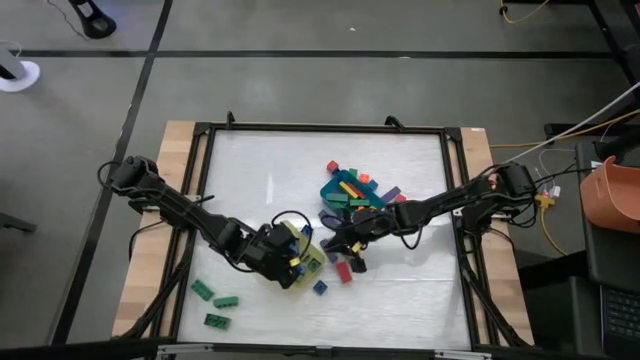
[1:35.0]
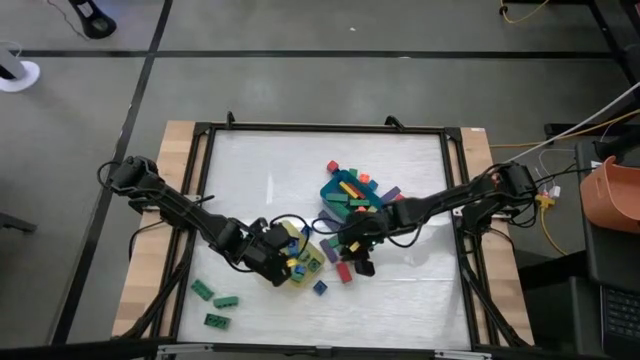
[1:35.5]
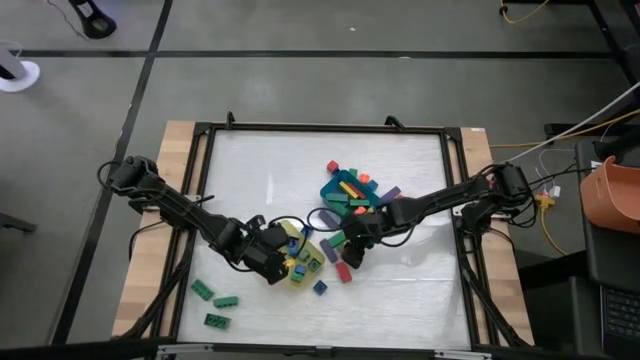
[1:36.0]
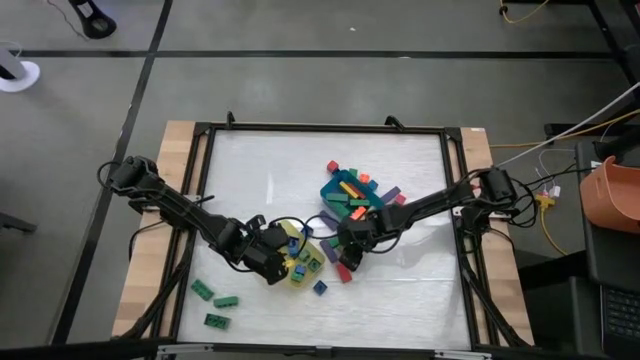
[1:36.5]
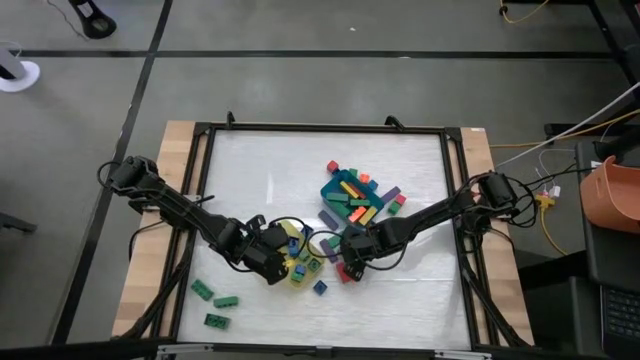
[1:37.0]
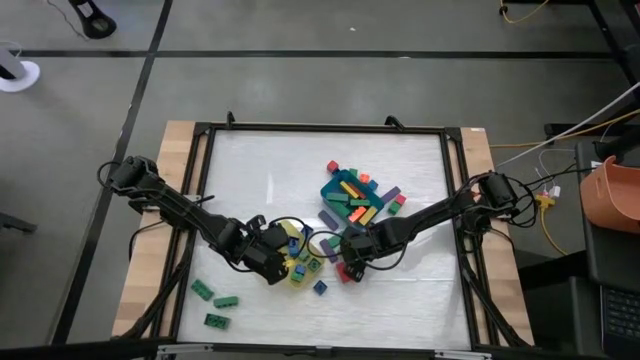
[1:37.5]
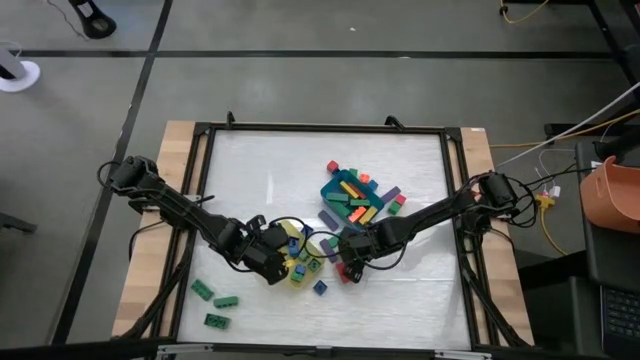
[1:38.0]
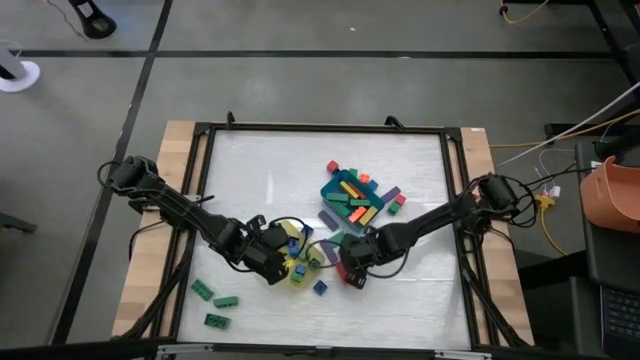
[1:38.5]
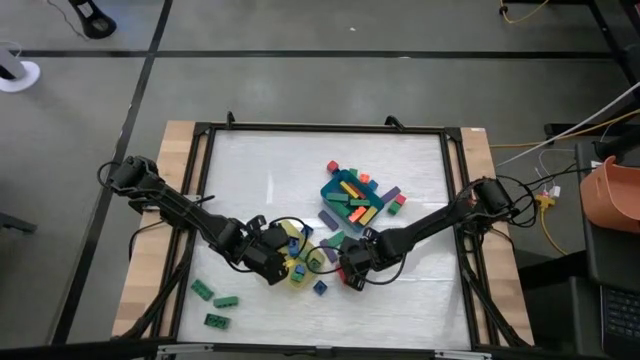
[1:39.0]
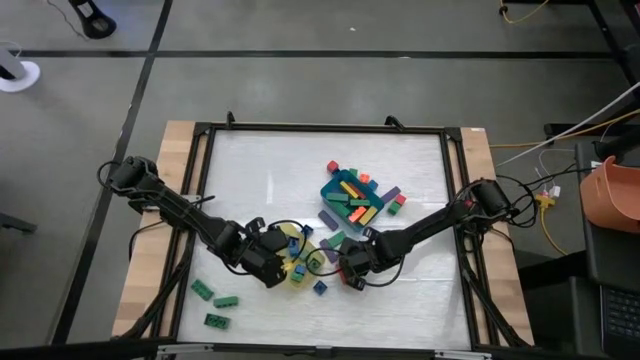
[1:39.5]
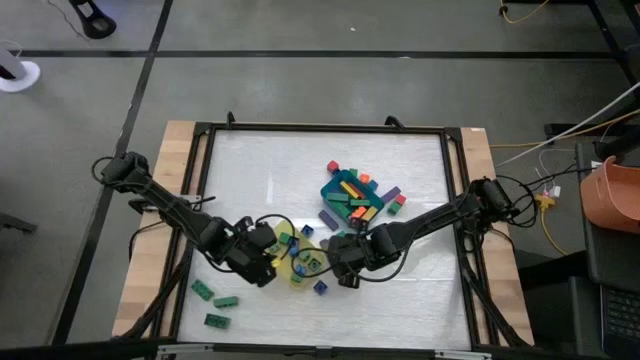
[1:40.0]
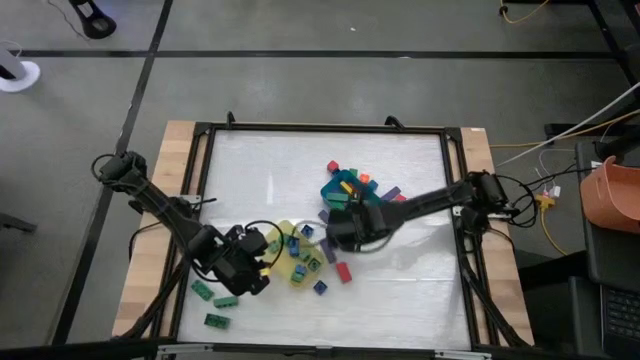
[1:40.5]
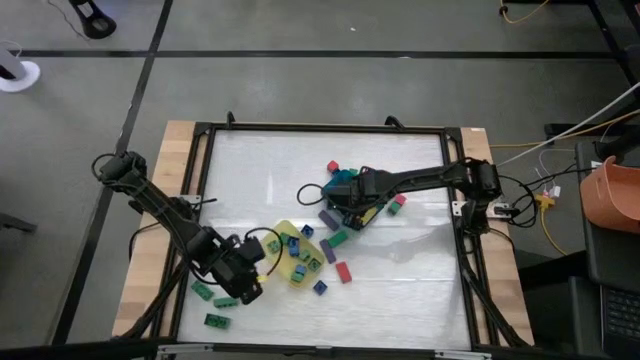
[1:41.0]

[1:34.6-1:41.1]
Task: Sort blocks by size
Put the large green wooden block into the blue bin

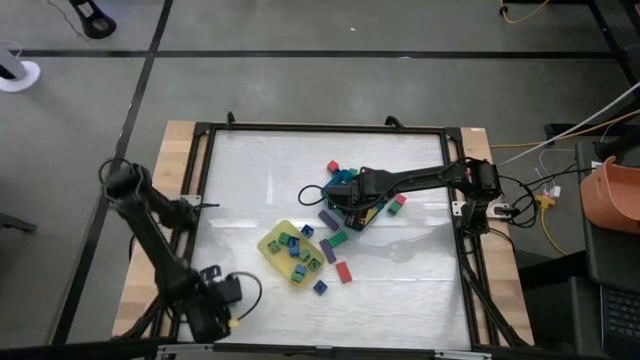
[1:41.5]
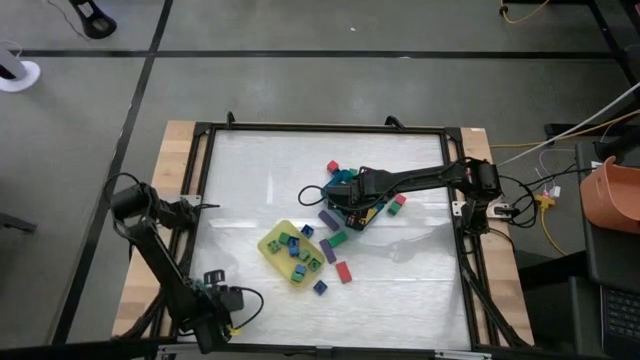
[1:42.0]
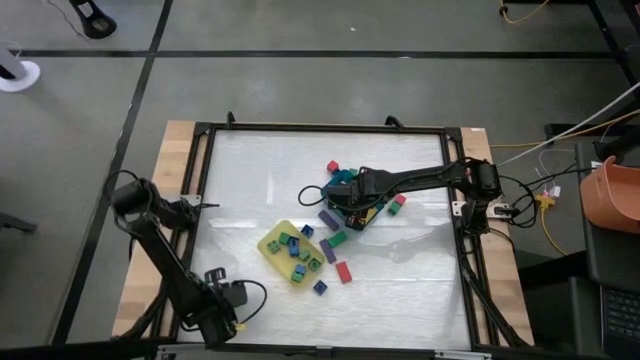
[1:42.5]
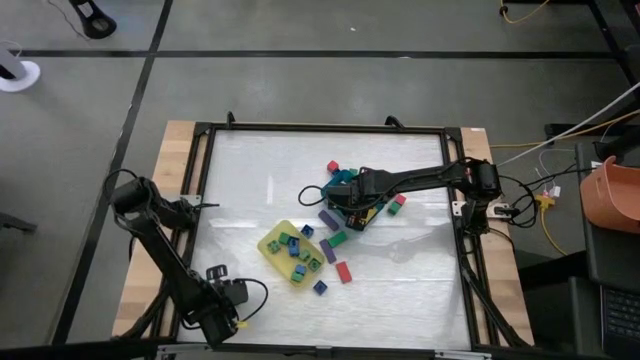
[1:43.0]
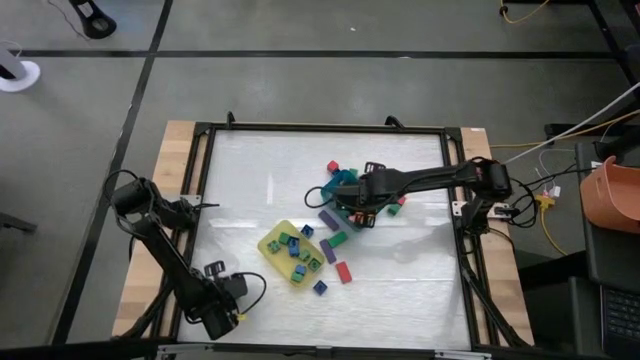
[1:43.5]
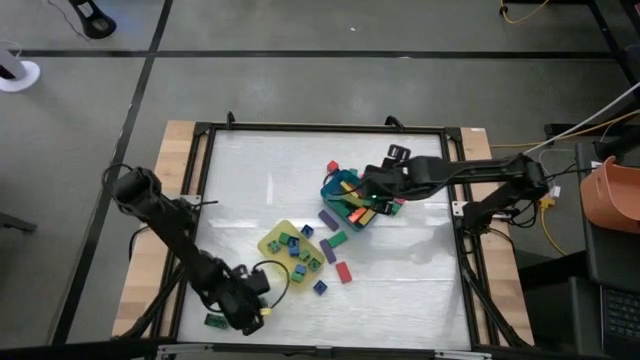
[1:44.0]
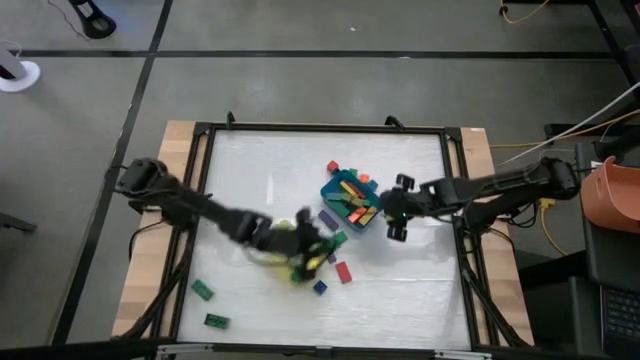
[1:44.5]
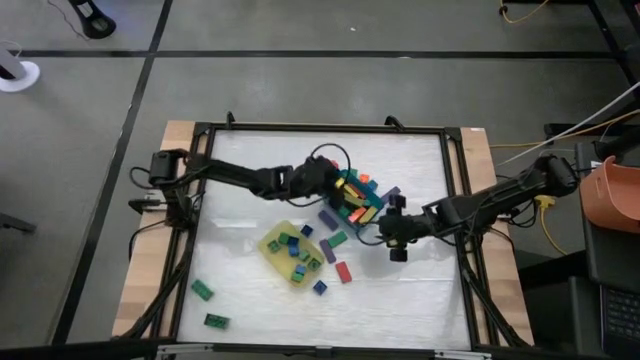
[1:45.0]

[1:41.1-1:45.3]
Put the large green game piece into the blue bin

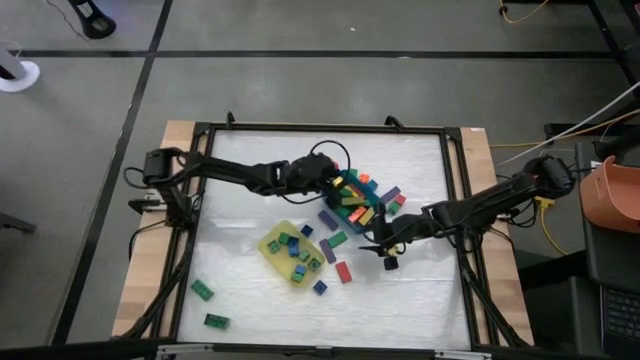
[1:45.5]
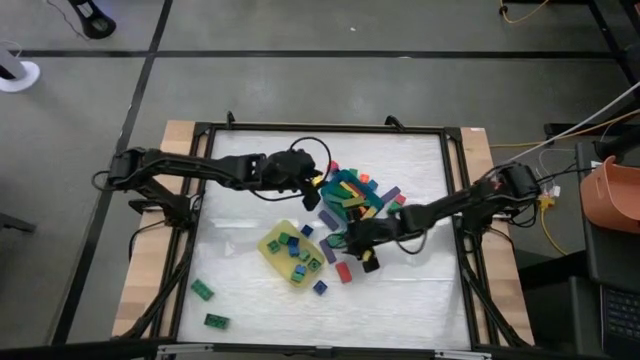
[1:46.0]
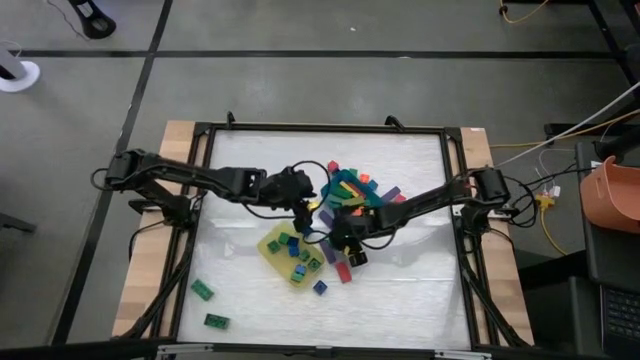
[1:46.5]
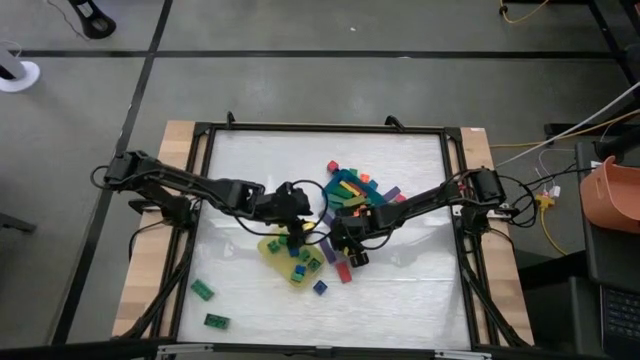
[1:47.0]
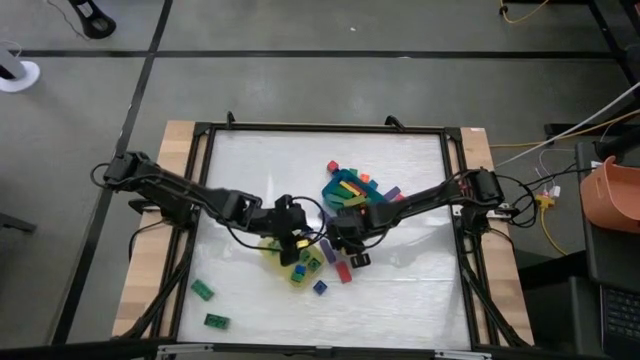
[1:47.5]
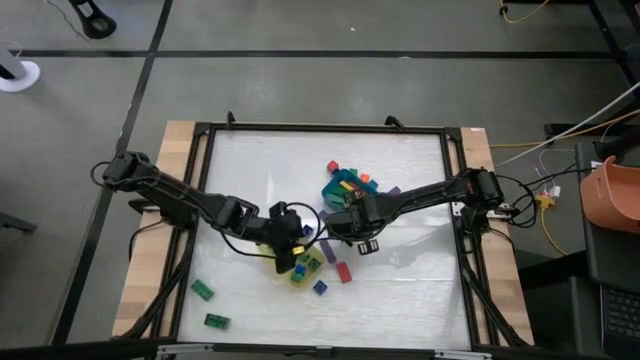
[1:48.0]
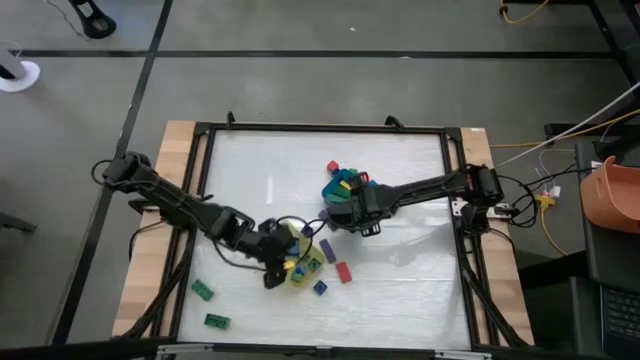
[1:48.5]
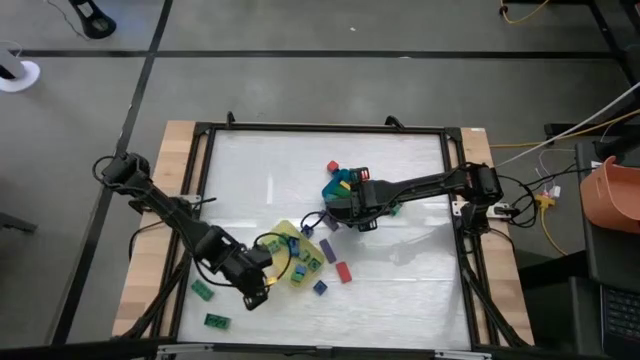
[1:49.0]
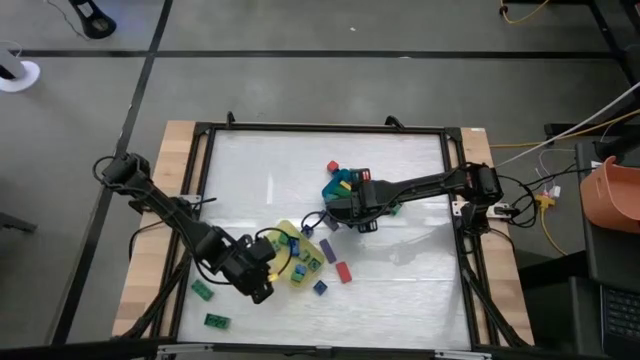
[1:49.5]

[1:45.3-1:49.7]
Put the large green wooden block into the blue bin

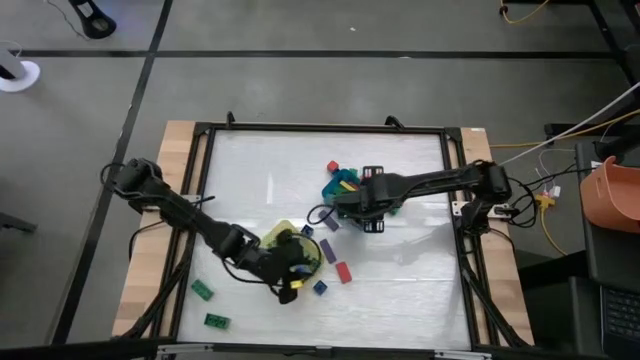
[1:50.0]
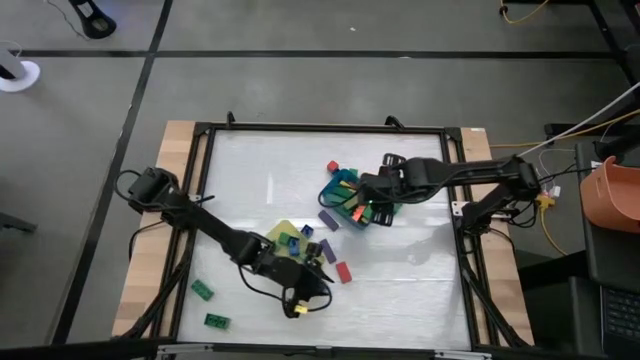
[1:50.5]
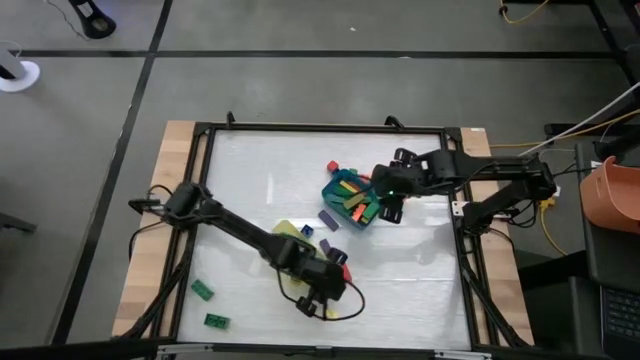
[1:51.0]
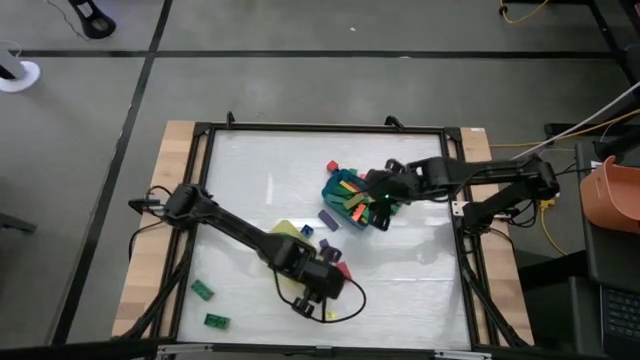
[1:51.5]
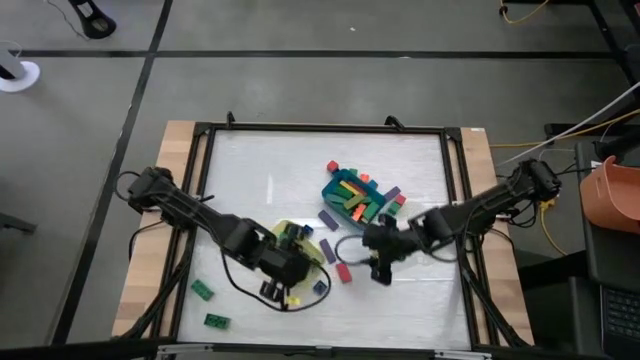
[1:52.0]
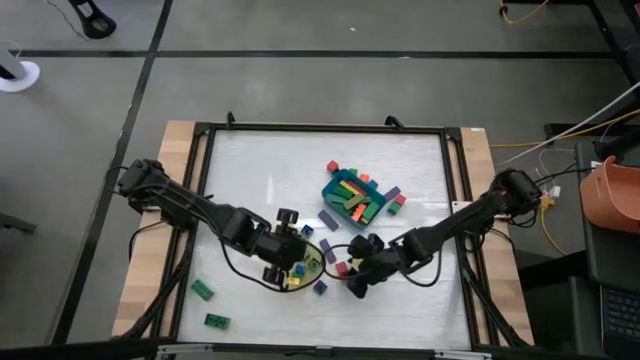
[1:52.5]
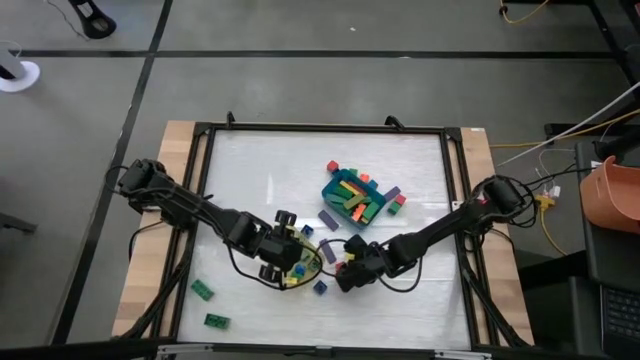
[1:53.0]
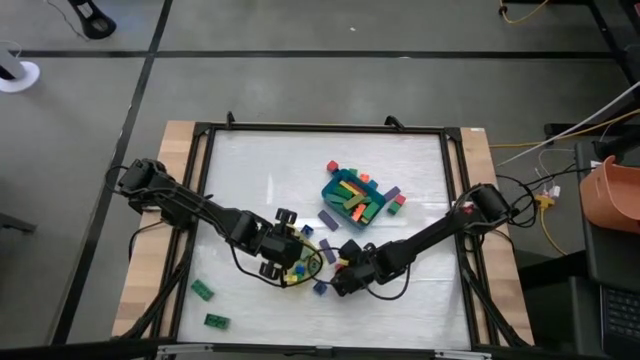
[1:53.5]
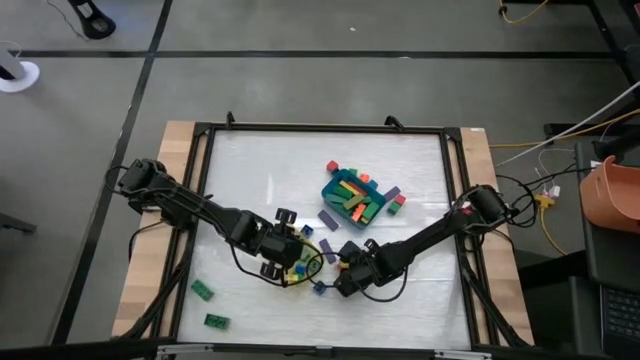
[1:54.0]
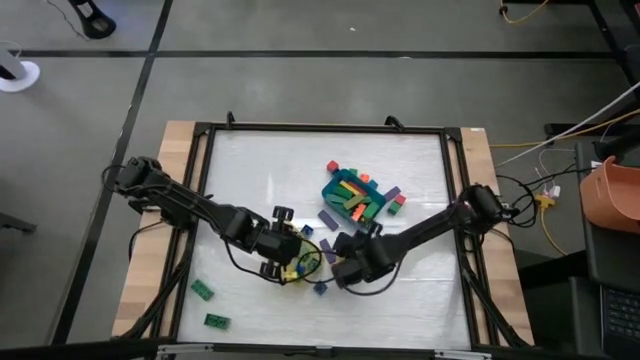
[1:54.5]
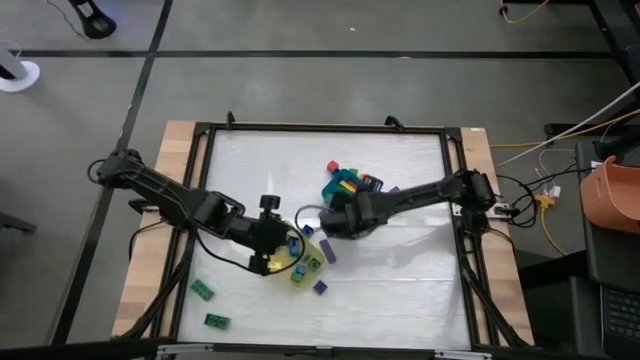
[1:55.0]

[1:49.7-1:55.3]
Put the large red wooden block into the blue bin
